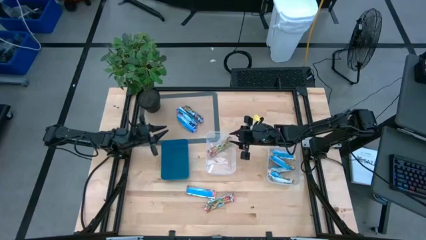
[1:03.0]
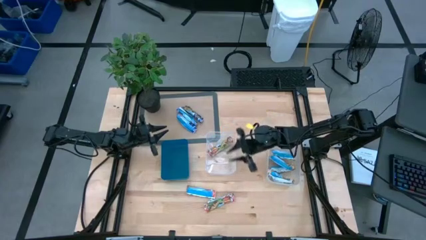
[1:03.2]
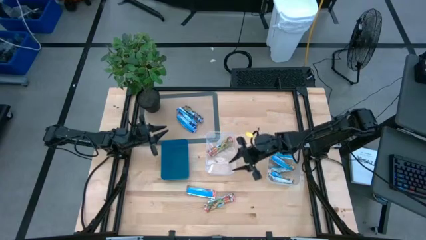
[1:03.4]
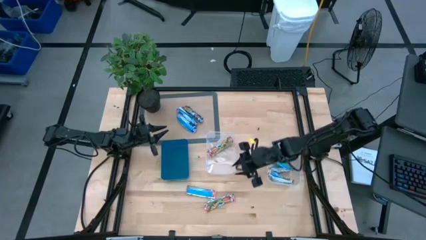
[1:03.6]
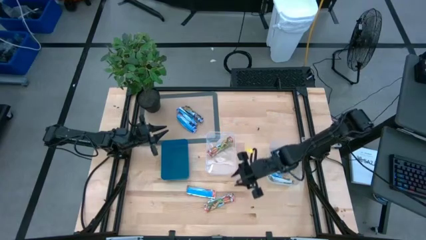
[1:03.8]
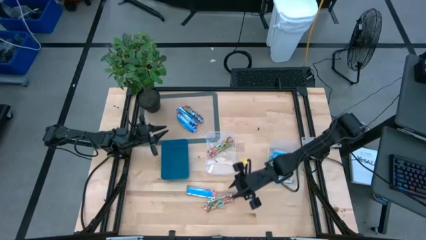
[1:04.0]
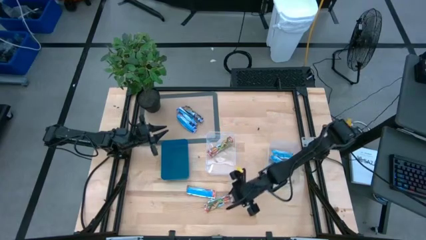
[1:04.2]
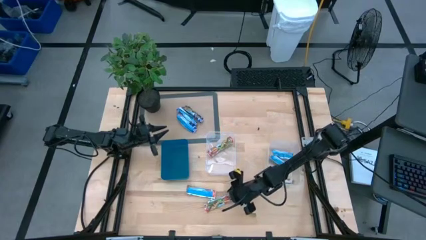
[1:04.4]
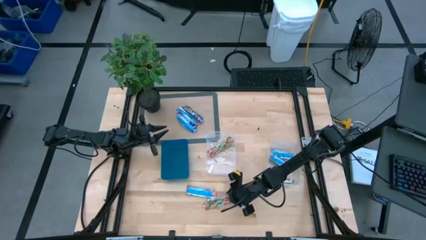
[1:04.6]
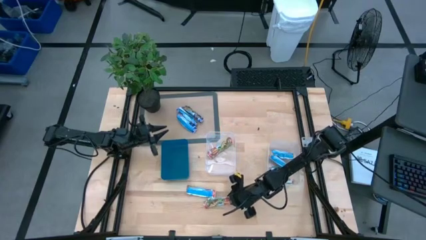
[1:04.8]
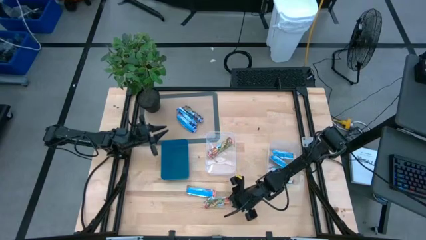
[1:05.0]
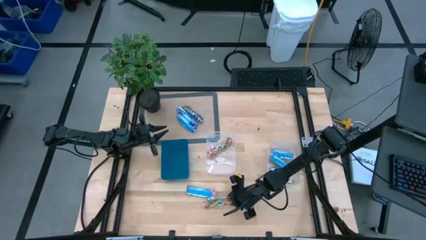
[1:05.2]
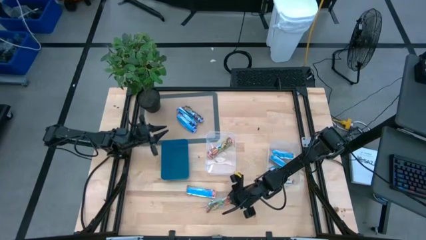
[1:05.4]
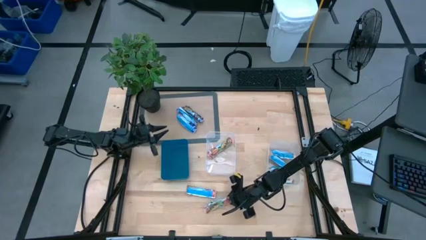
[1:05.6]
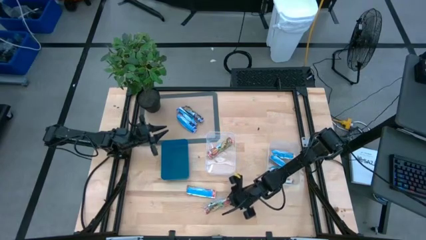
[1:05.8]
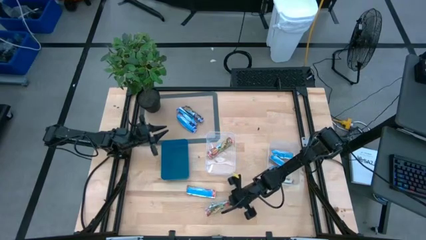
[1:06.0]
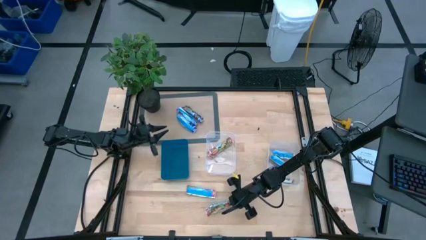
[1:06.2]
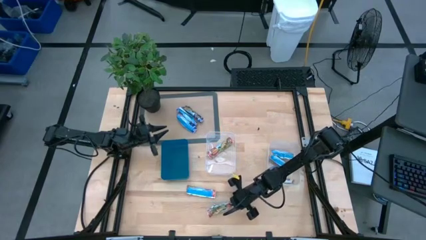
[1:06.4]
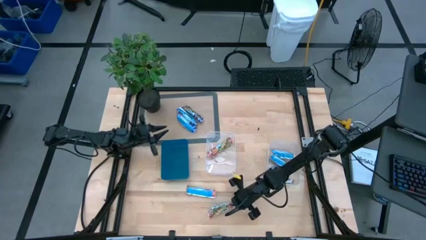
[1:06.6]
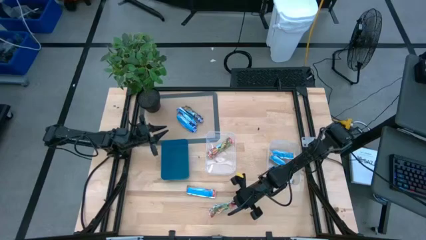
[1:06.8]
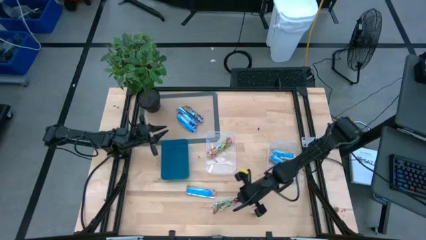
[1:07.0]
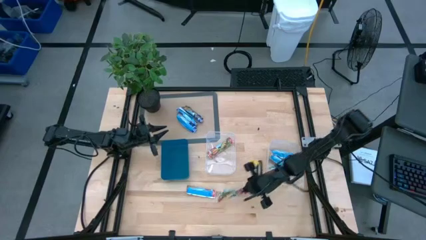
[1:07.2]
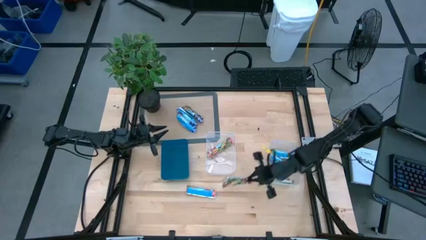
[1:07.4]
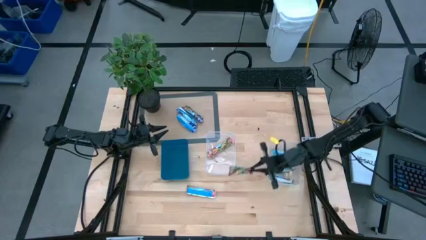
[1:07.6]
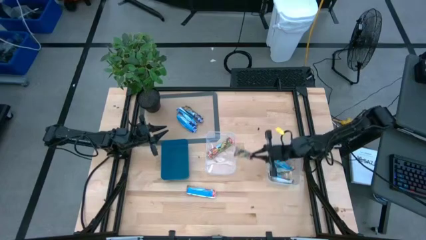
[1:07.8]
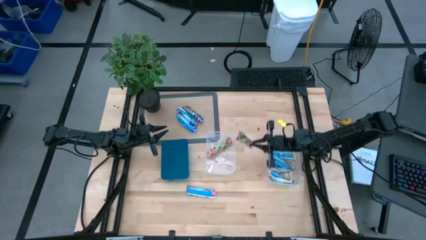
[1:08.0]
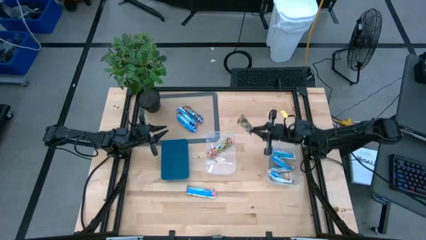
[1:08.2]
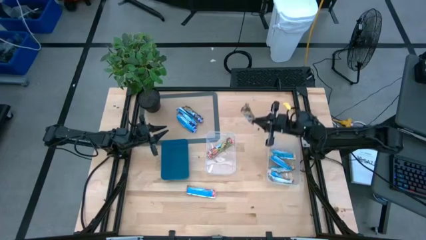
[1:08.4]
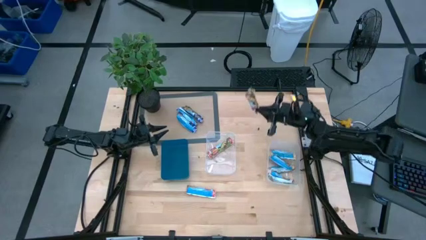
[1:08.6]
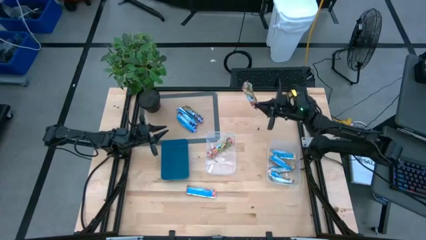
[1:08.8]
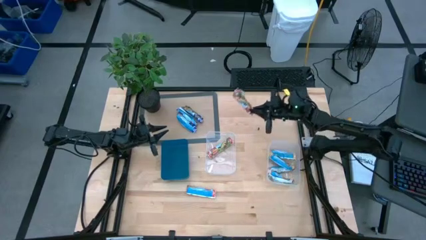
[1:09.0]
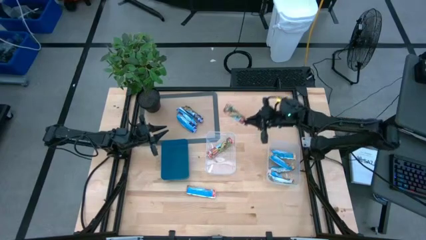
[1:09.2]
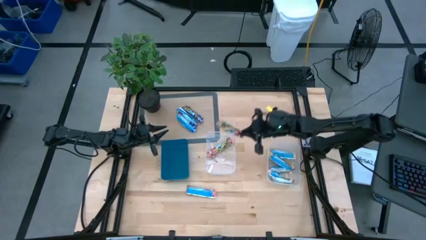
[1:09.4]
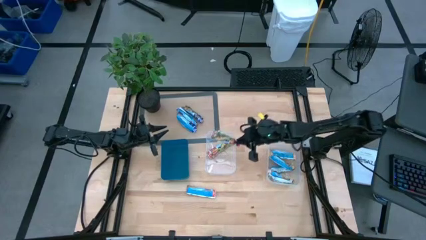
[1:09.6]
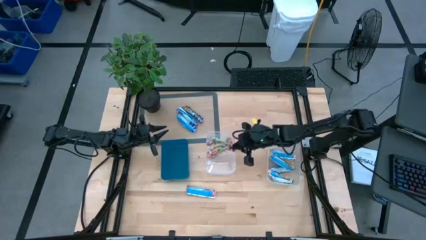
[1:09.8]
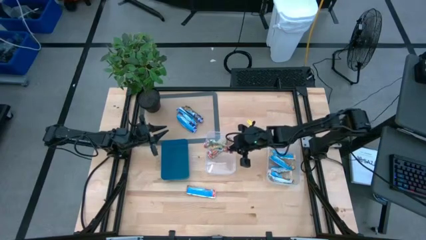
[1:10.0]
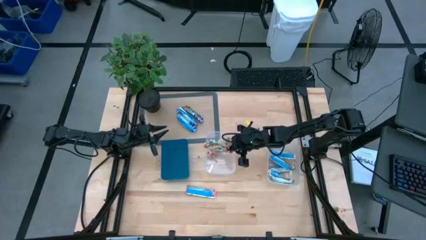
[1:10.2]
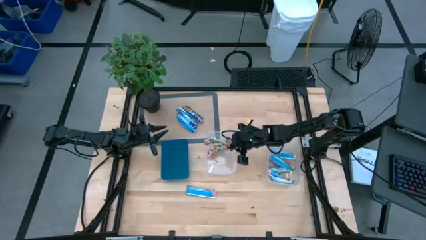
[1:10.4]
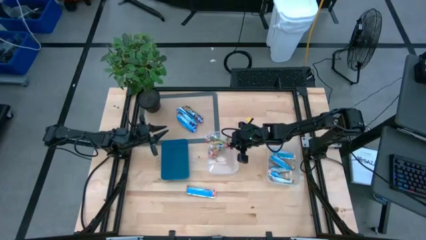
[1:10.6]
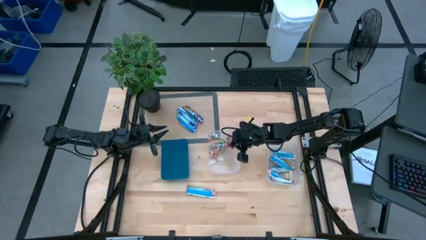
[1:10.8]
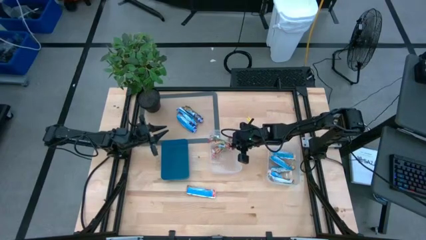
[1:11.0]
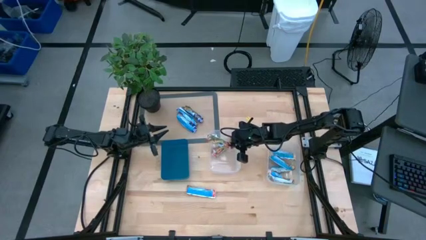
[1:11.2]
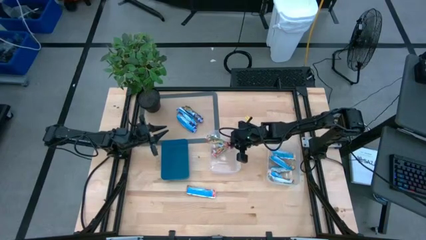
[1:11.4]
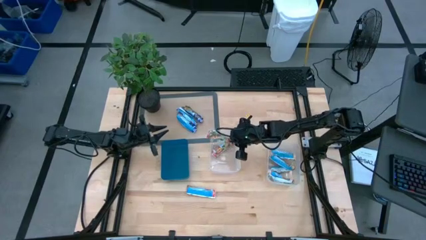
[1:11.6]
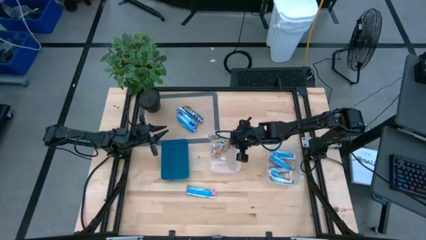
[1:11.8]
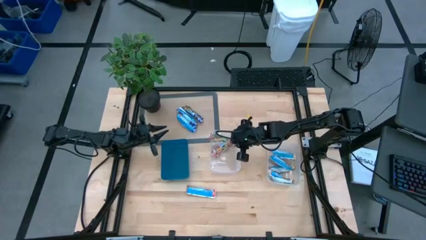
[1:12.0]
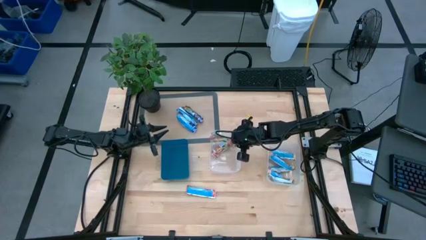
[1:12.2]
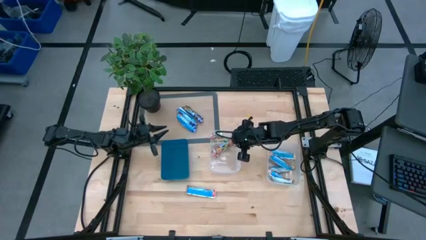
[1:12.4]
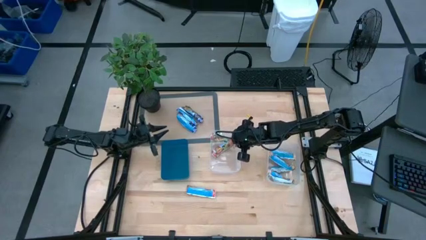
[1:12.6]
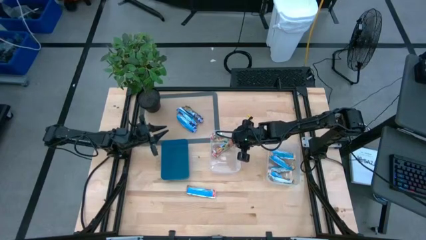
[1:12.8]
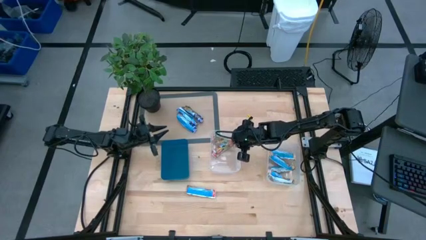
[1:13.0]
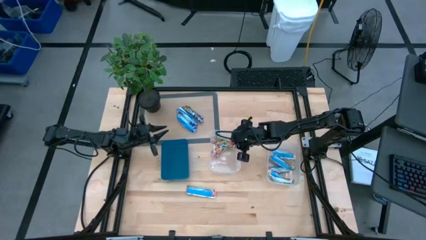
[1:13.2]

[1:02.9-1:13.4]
Task: Pick and place Granola Bars by type
Put the red granola bar into the left transparent bin

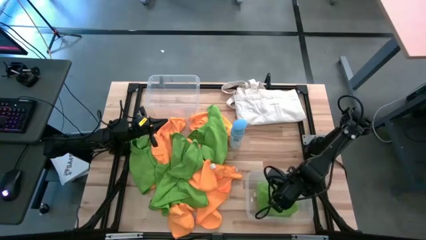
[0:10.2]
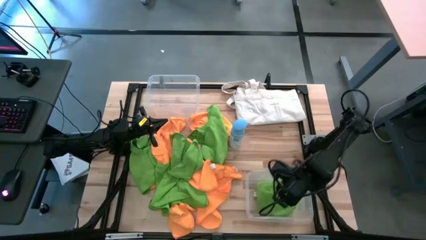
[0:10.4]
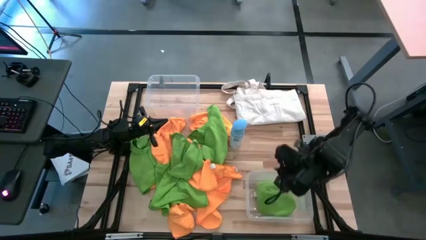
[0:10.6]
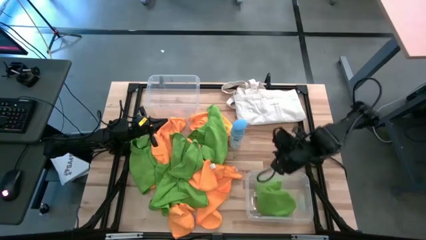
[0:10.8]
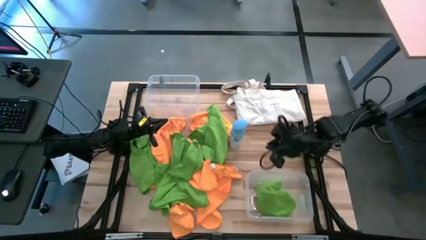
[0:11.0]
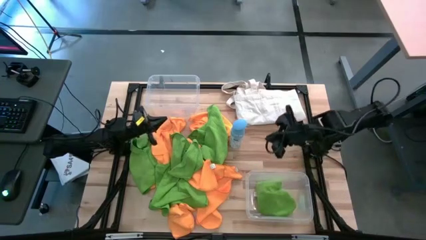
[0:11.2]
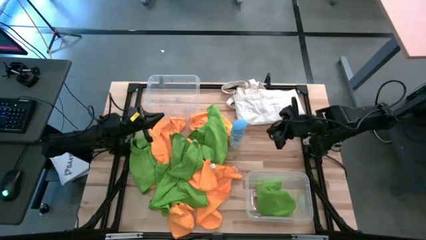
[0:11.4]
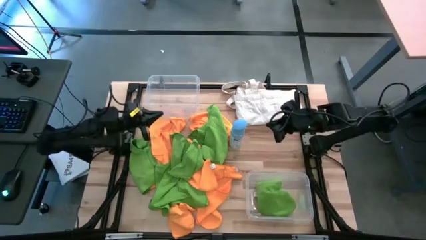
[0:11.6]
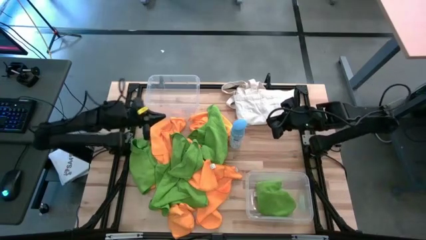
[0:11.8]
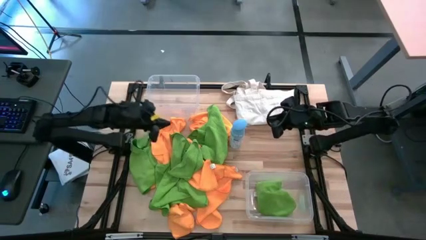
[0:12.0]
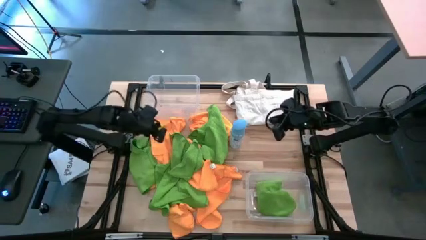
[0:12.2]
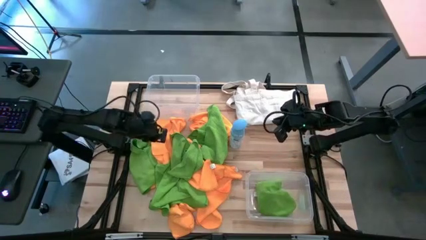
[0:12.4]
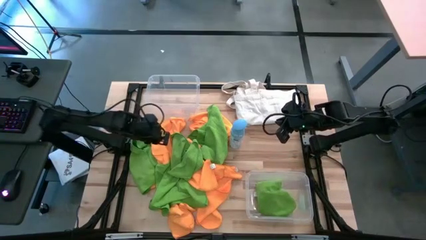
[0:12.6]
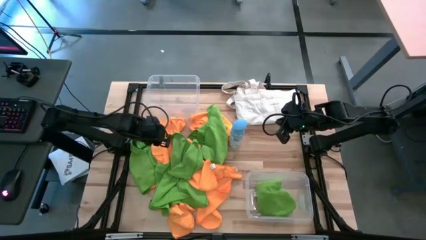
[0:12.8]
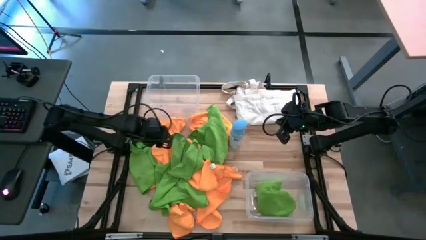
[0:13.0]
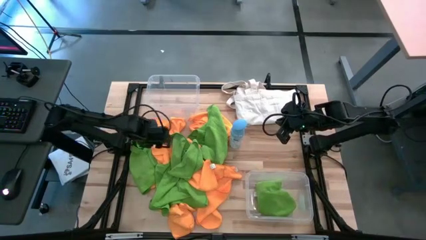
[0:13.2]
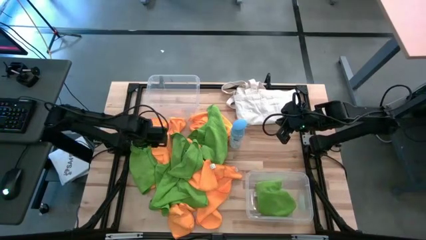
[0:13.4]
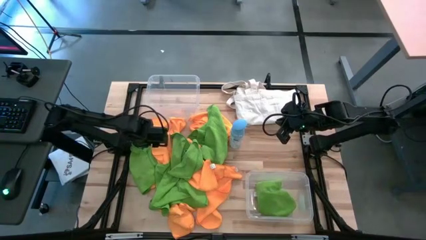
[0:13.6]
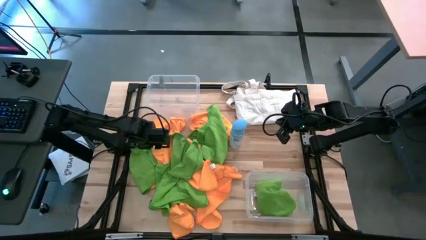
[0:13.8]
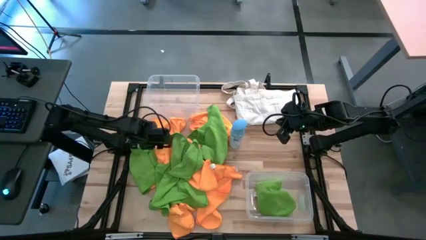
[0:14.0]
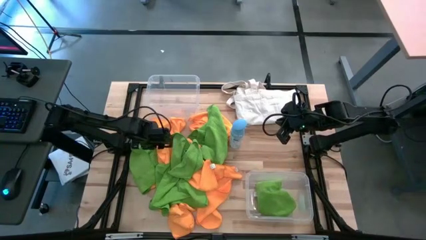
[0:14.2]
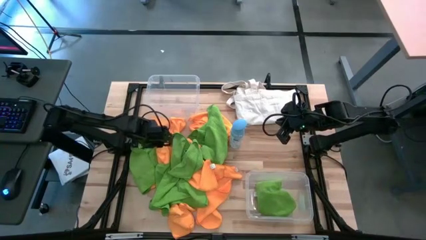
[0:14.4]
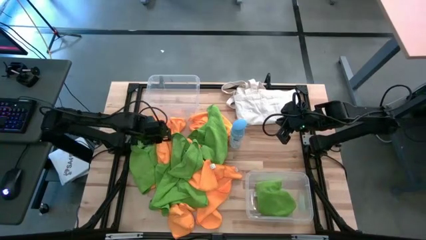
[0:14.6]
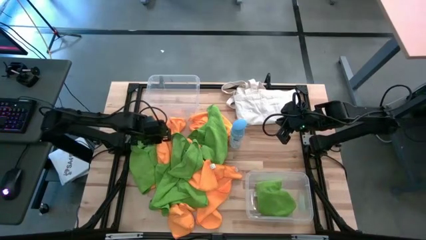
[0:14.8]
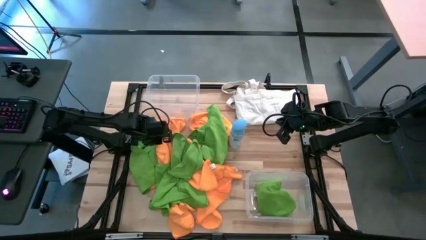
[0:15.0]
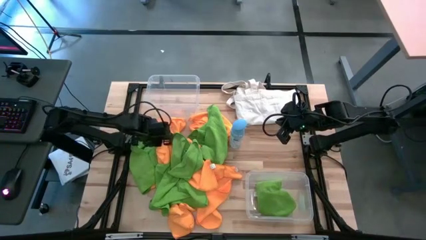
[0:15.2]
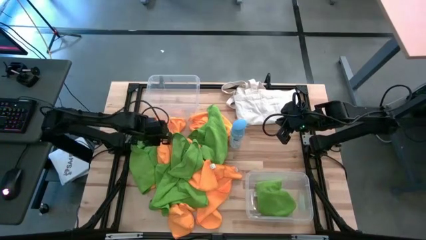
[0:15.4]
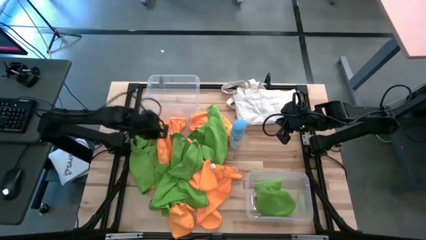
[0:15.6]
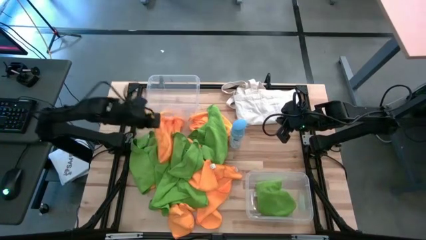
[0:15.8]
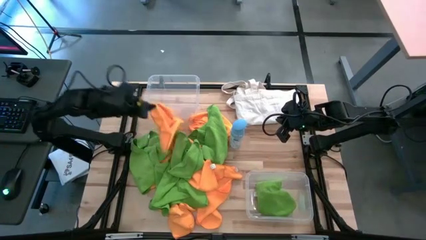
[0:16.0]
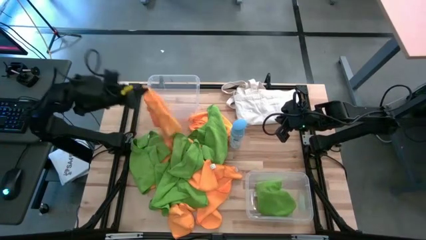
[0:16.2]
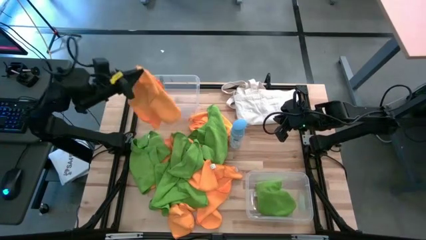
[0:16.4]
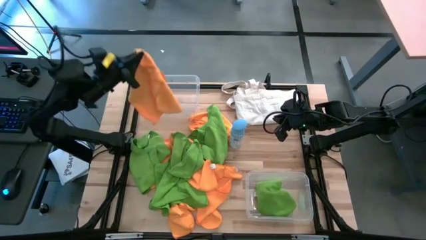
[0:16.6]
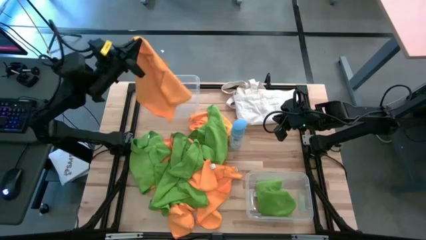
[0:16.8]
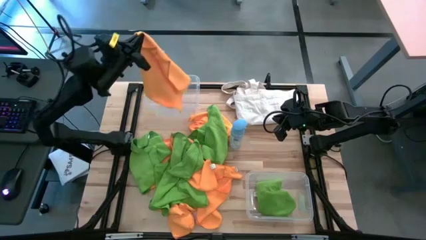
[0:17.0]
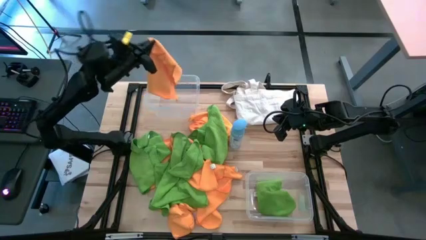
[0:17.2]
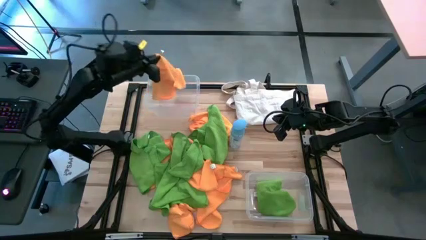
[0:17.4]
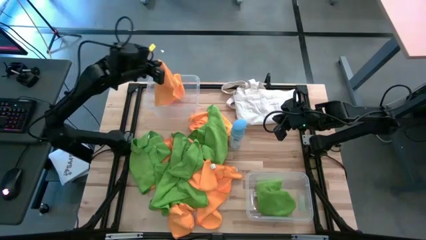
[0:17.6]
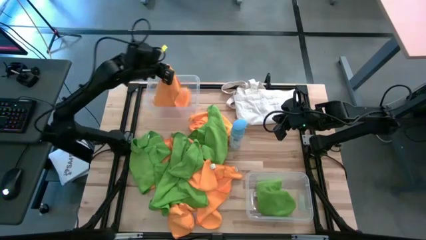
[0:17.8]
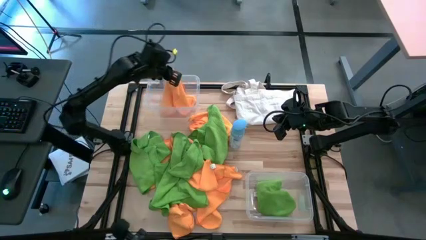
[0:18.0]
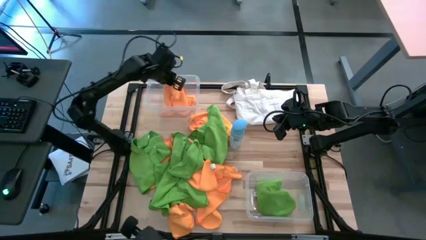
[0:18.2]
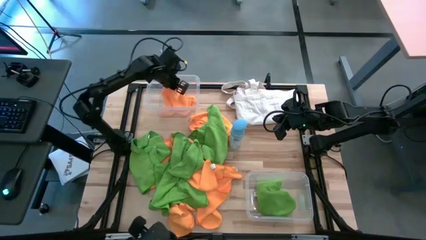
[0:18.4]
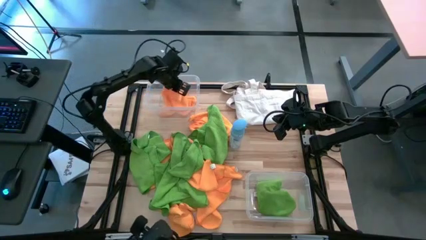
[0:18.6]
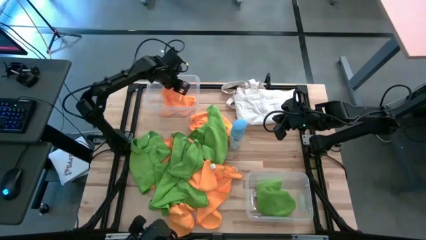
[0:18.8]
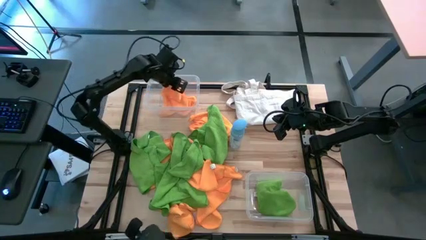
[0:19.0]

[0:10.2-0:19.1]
Task: Sort microfiber towel by color & place in baskets
Put the yellow microfiber towel into the top transparent bin
